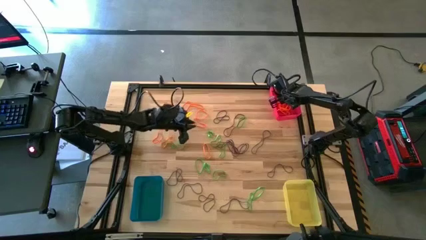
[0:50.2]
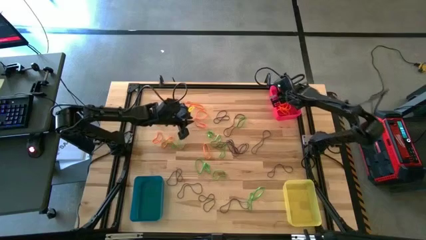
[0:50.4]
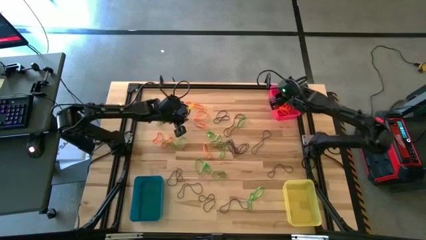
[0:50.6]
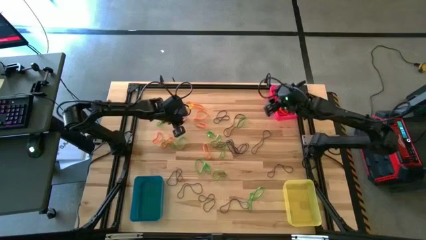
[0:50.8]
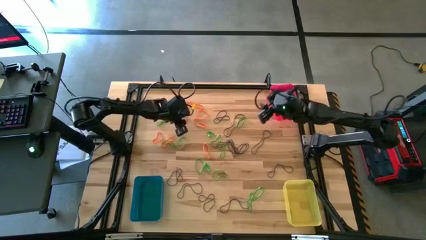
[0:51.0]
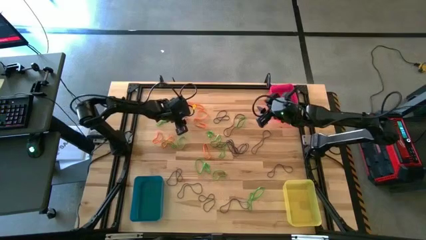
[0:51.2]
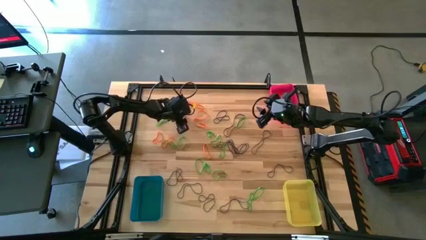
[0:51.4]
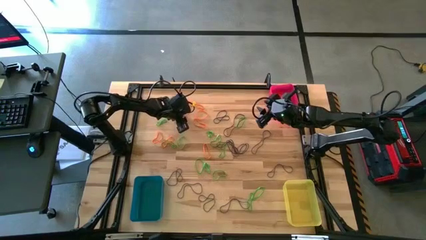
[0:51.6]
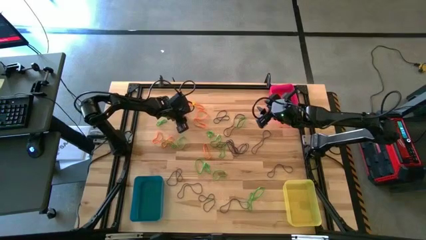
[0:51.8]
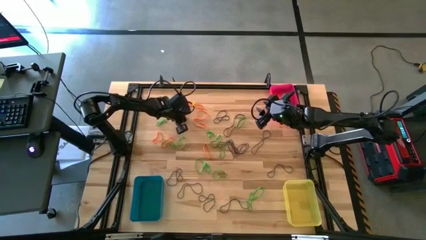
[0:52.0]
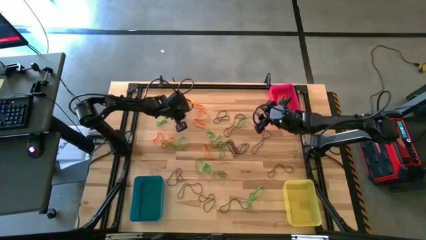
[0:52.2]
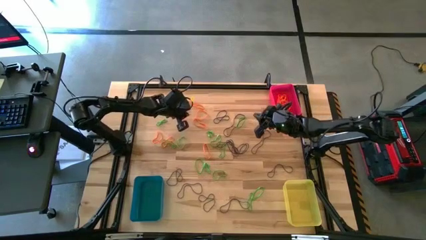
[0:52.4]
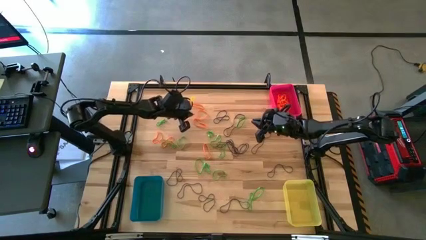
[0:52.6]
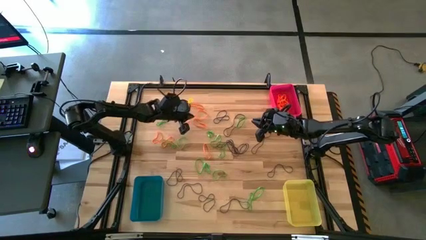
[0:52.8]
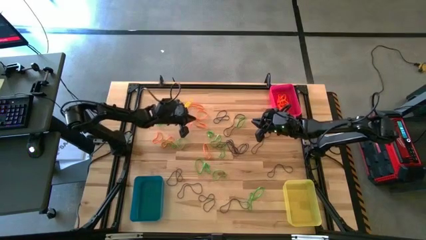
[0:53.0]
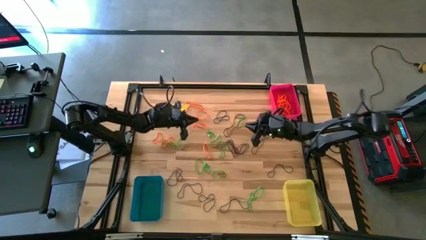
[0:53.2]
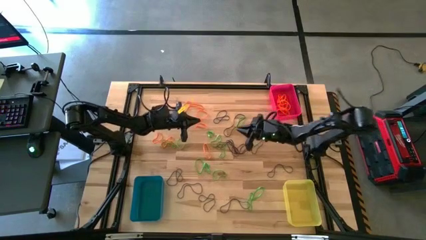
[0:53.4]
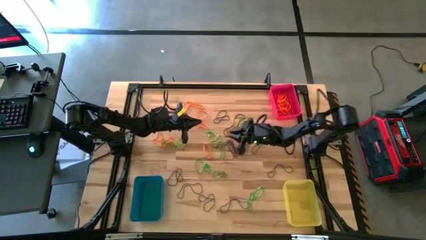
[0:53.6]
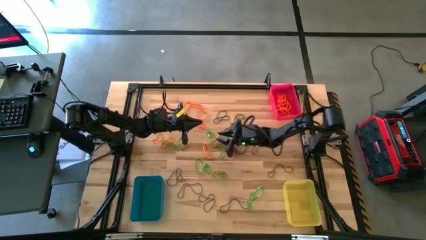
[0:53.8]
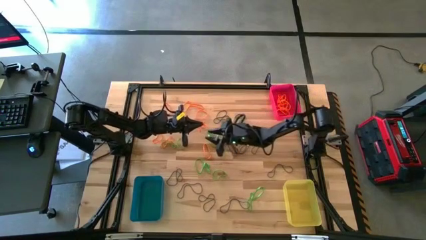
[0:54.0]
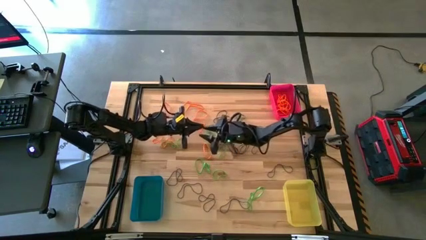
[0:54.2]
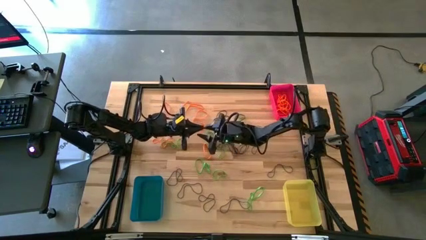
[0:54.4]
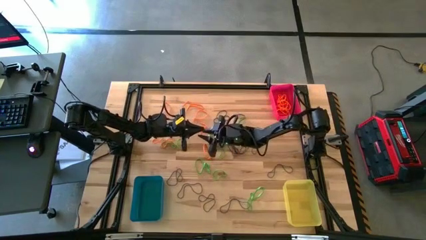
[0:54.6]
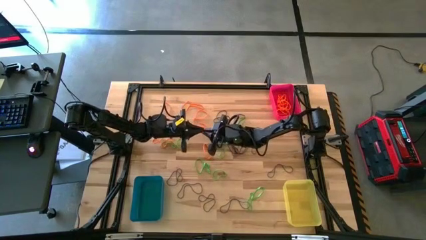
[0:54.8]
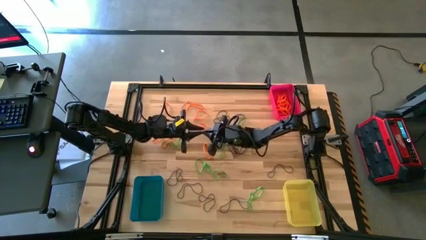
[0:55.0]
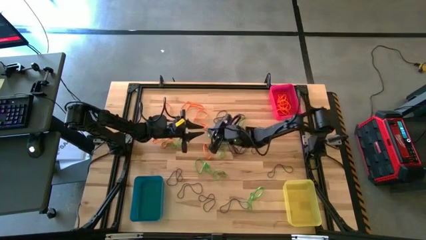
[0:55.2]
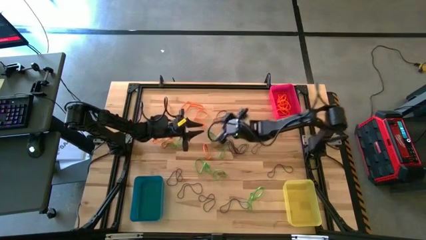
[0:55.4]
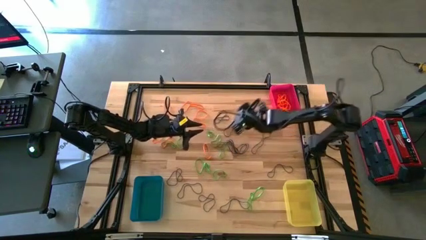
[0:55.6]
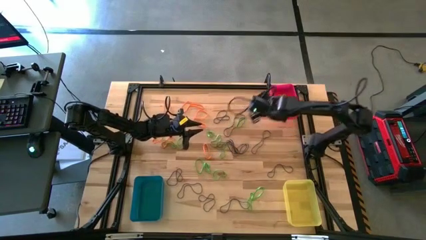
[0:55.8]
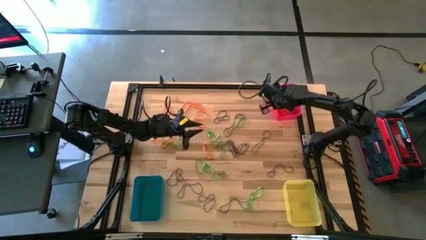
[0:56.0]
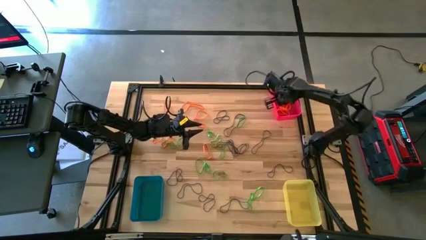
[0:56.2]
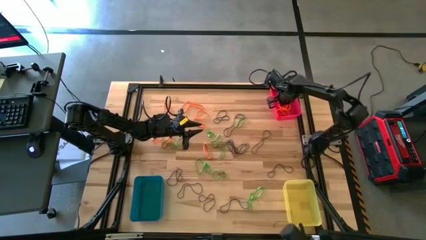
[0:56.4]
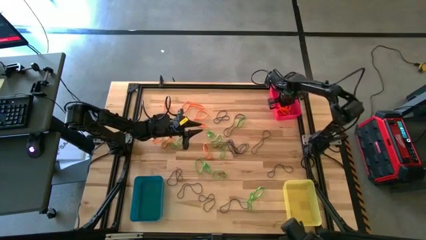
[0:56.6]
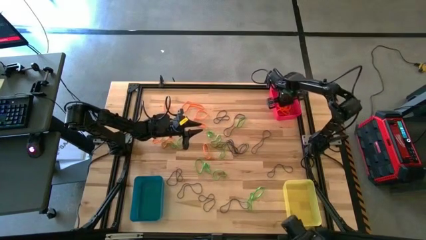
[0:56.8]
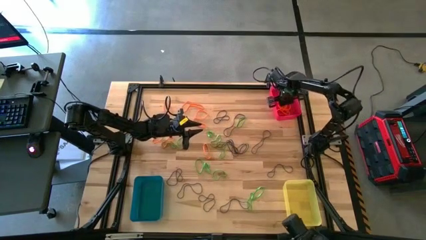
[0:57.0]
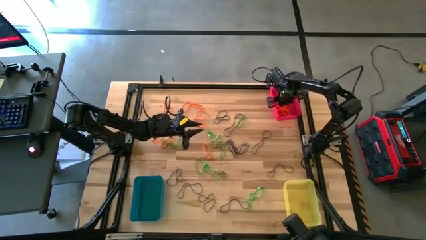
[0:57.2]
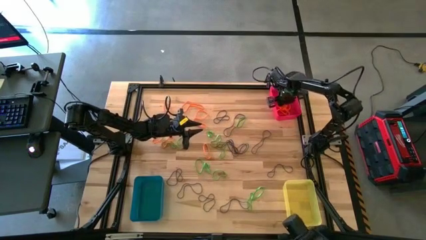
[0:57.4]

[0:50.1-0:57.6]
Task: Sort rubber bands into baskets
Put the orange rubber band into the red bin

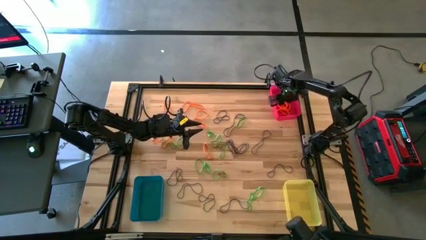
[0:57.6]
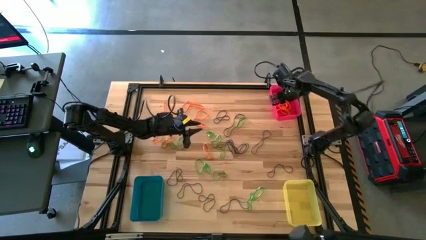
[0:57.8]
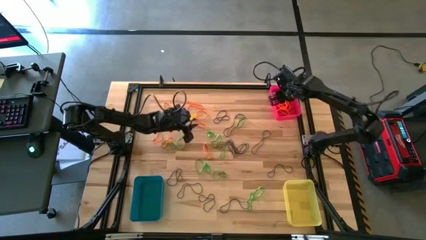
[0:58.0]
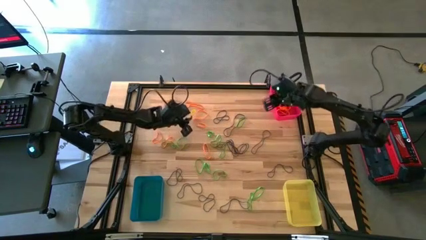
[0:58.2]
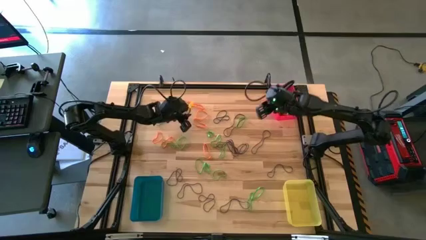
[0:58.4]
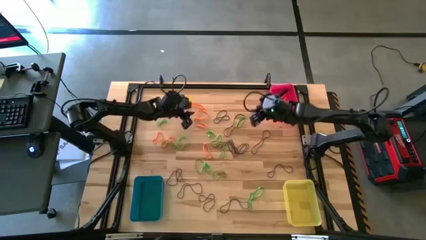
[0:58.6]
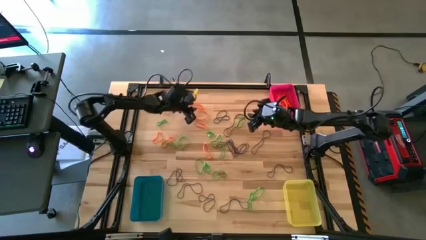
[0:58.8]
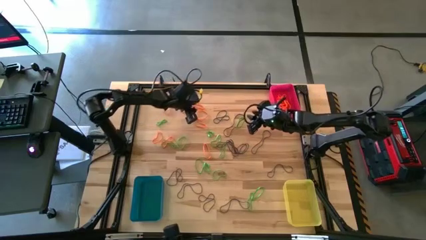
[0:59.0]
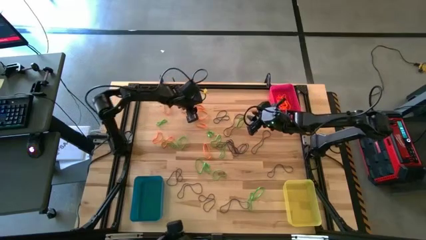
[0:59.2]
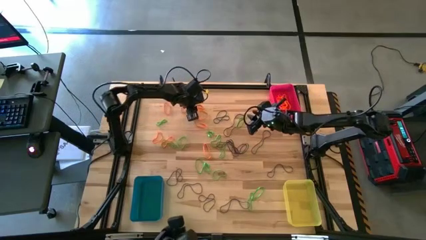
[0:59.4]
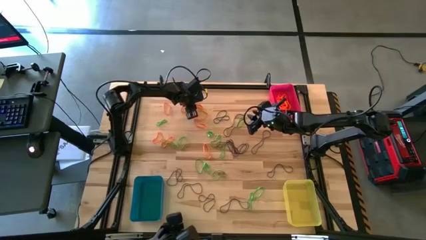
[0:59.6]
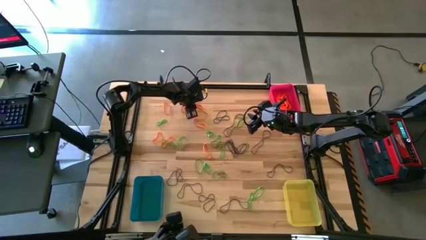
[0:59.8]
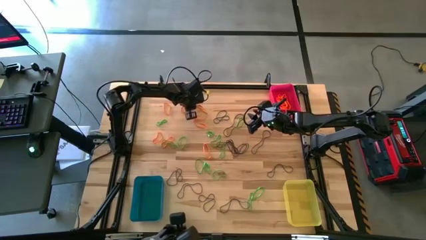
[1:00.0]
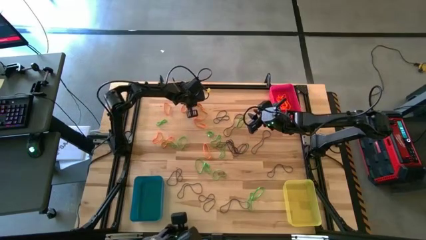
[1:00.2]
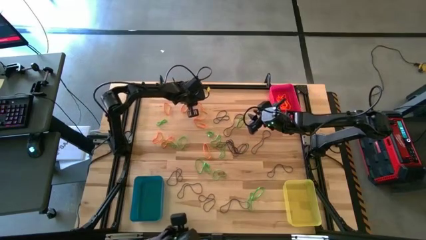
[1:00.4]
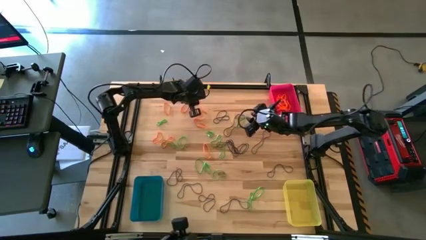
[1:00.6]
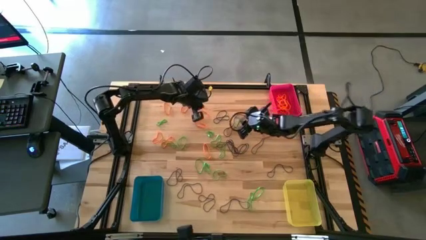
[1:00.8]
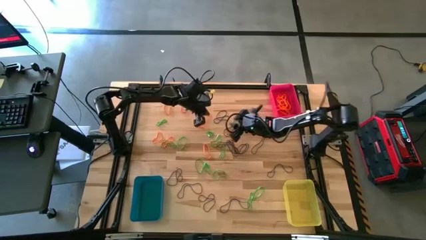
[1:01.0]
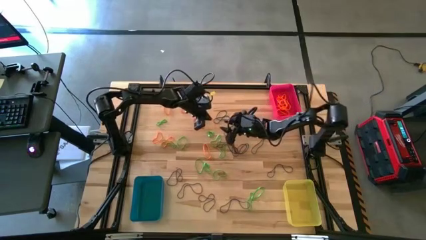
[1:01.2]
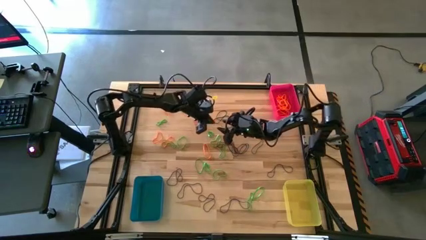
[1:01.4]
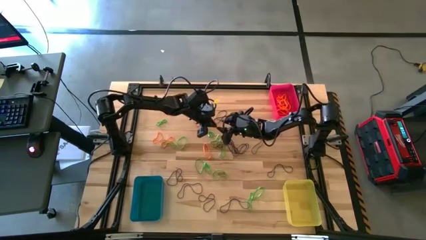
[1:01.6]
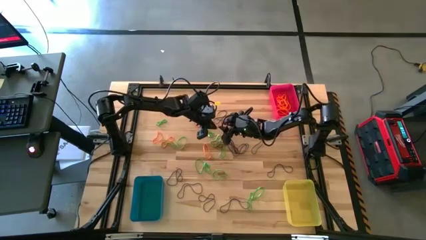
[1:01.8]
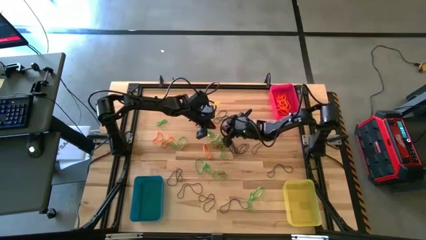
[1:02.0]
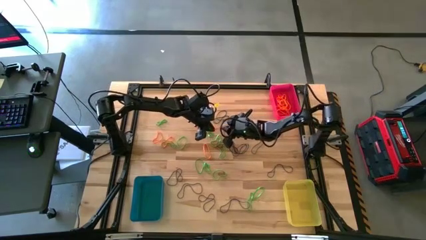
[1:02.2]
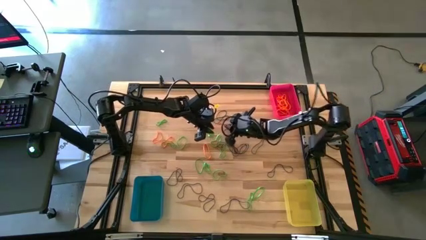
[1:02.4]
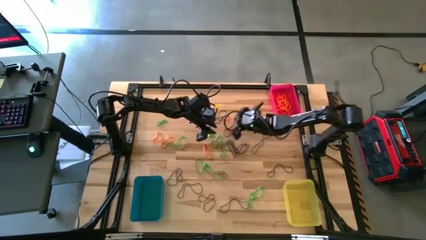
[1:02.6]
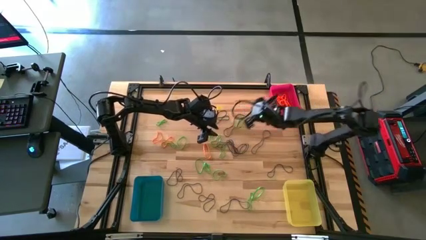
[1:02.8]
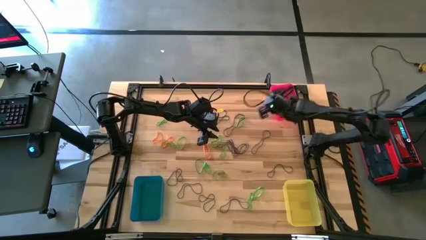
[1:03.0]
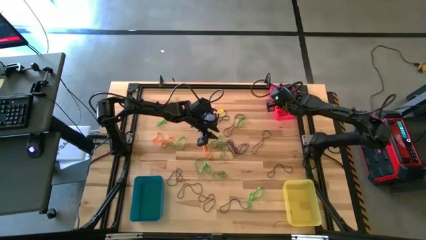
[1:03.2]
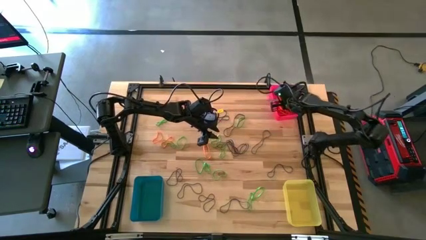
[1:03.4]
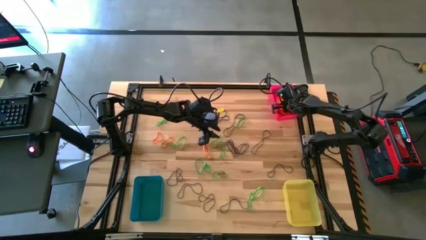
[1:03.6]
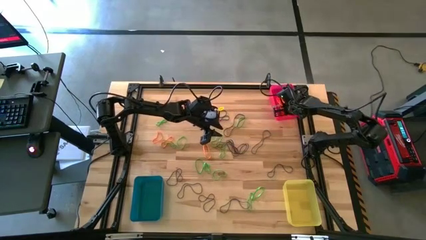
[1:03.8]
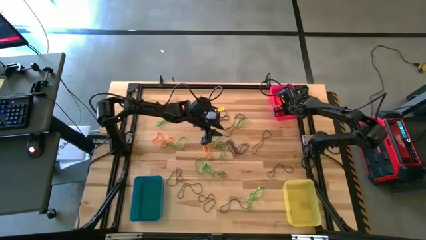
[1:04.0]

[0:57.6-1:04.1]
Put the orange rubber band into the red bin

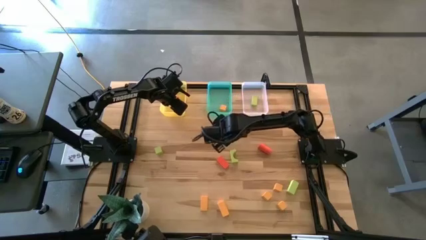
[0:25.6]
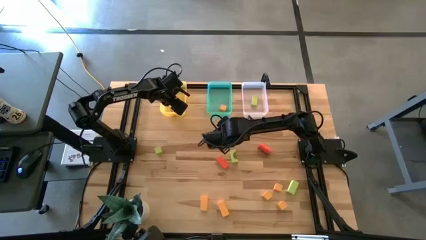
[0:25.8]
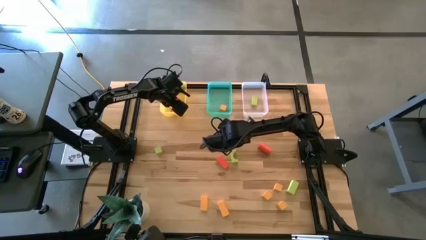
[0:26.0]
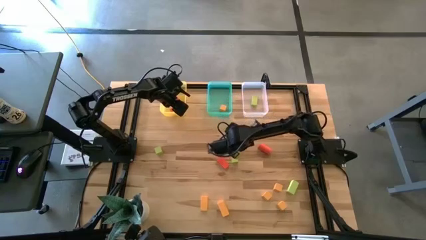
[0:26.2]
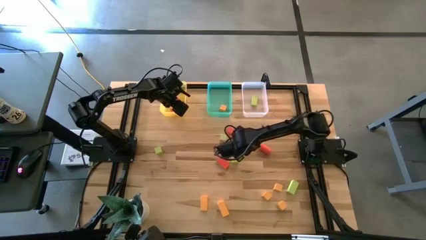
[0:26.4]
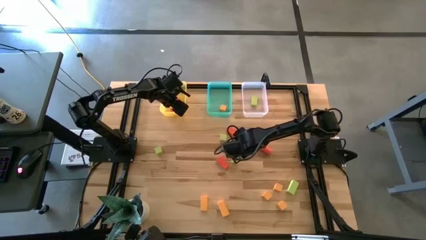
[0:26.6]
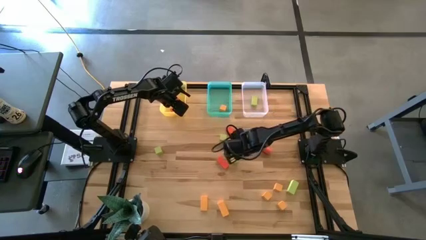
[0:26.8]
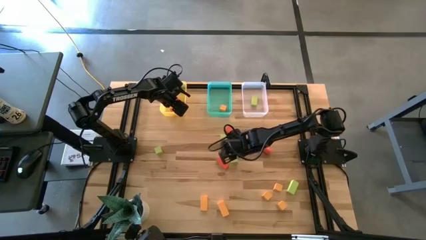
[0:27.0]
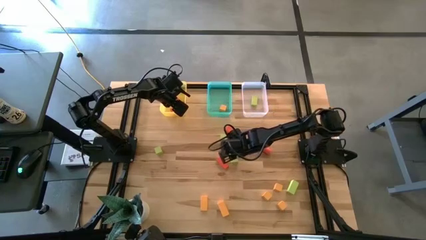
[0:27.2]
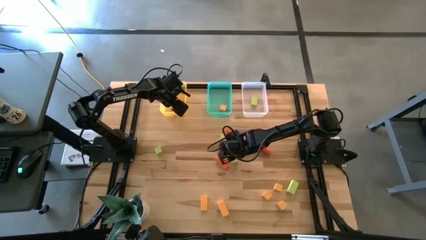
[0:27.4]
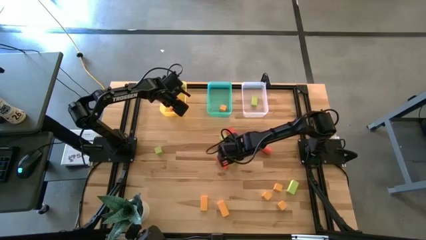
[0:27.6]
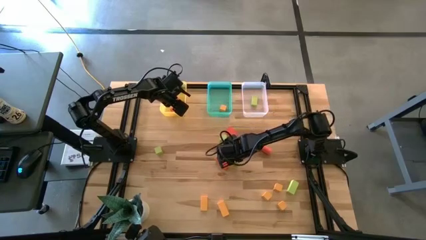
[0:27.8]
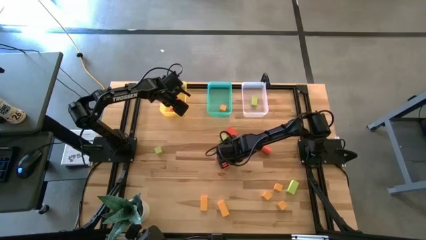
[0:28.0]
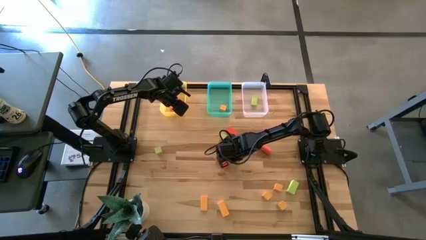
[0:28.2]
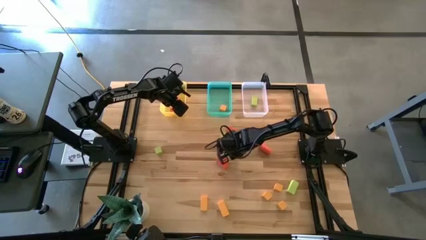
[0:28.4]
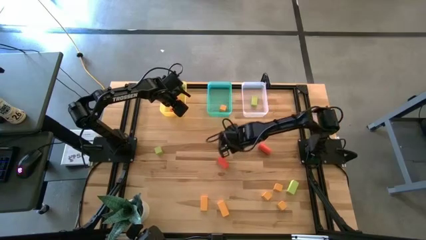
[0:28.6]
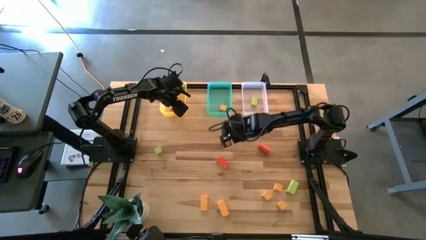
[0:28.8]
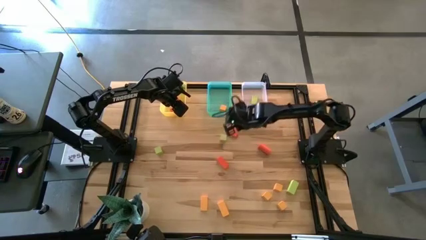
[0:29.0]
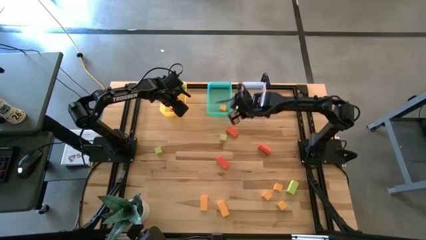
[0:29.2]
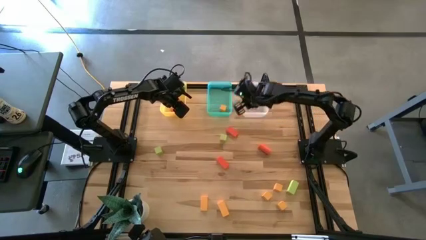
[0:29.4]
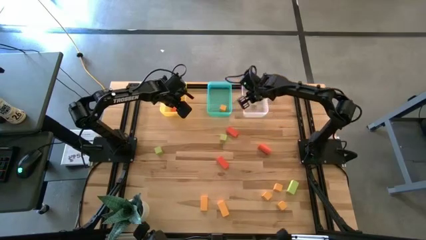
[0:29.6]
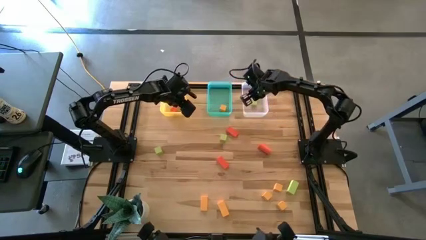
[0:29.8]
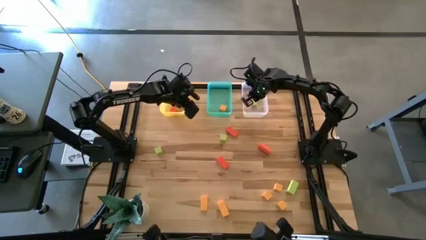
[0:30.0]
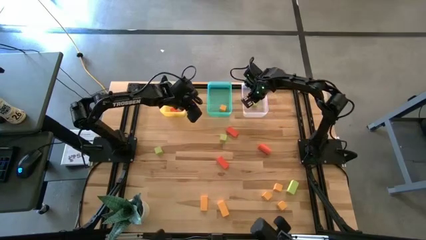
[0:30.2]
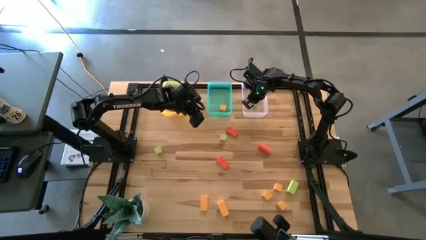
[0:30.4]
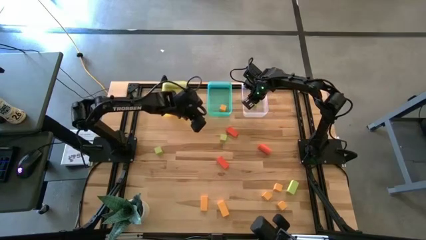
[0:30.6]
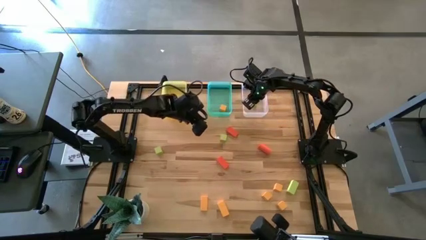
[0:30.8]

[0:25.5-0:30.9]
Task: Sort & place blocks by color
Put the green block into the transparent bin
